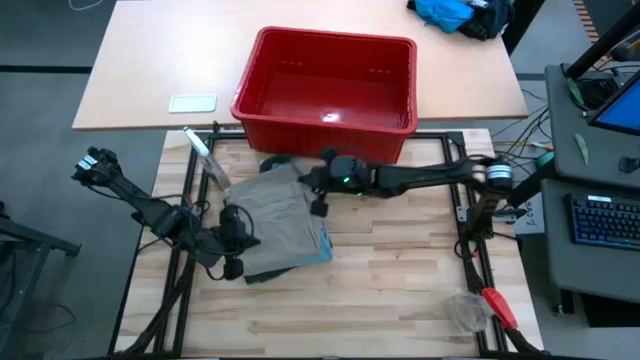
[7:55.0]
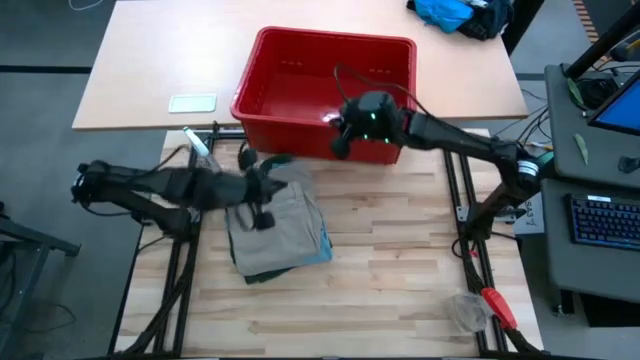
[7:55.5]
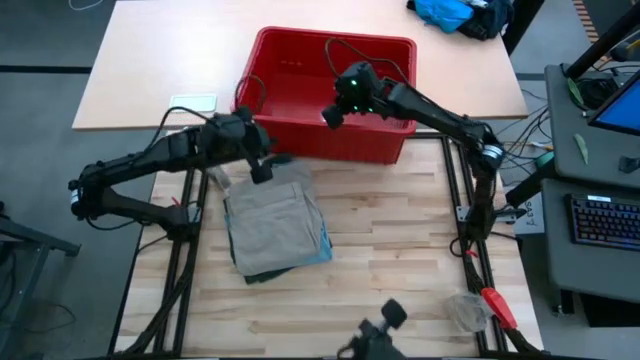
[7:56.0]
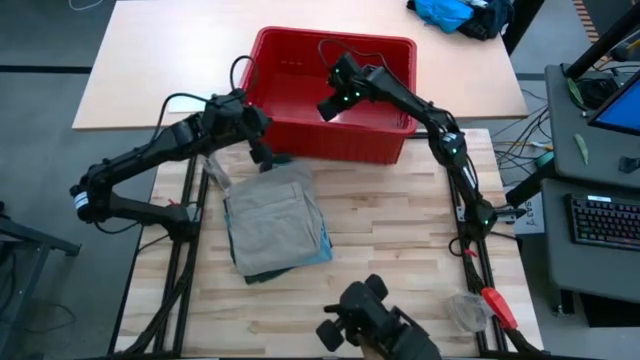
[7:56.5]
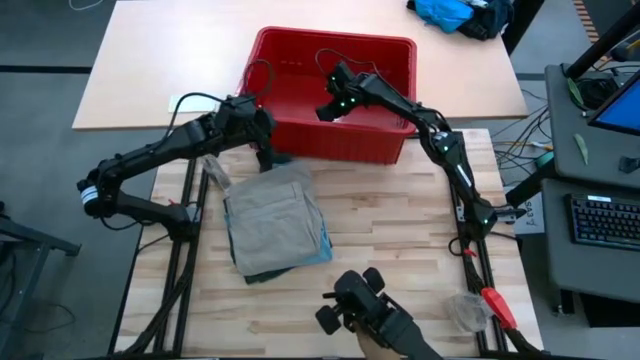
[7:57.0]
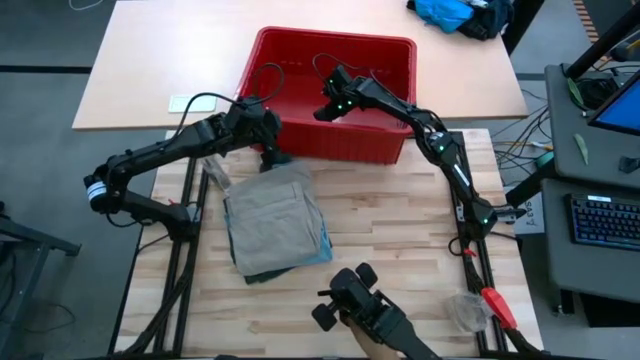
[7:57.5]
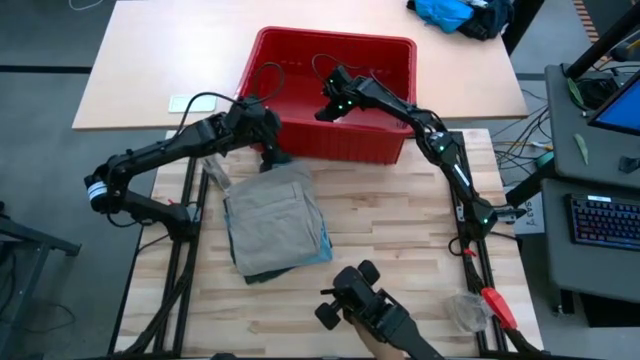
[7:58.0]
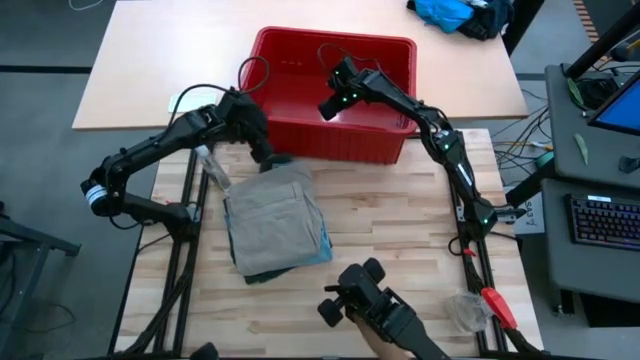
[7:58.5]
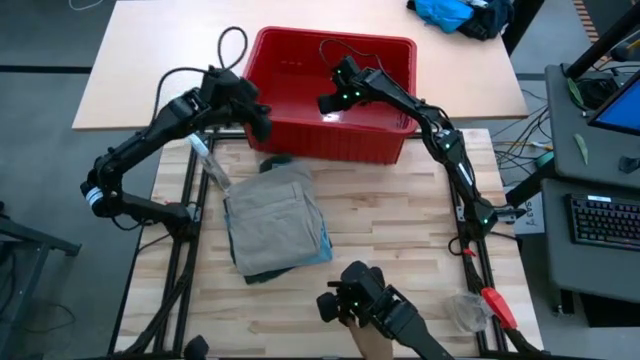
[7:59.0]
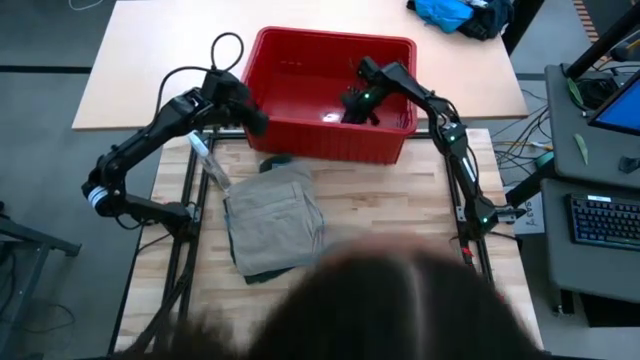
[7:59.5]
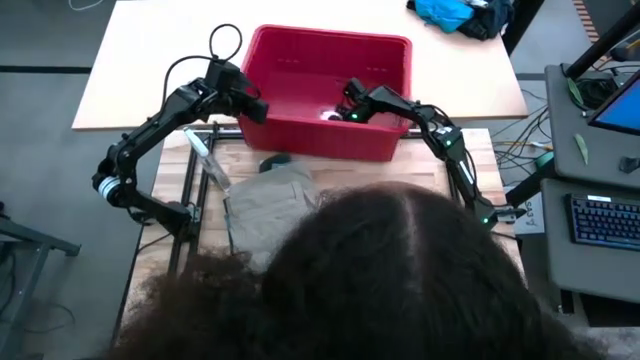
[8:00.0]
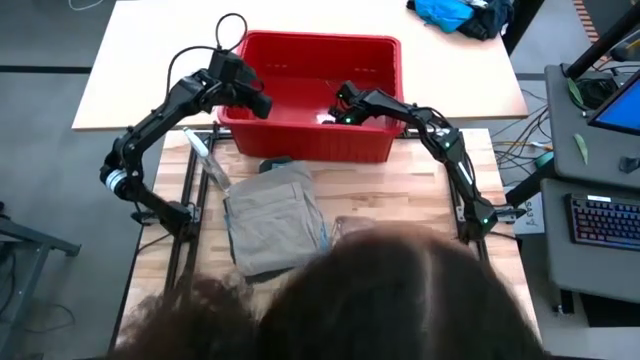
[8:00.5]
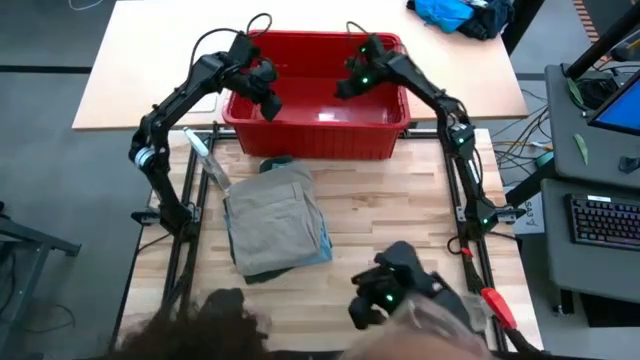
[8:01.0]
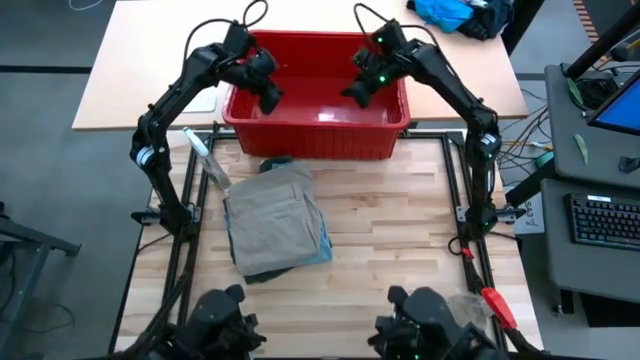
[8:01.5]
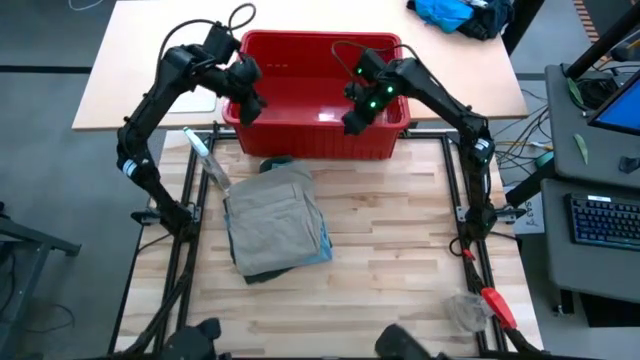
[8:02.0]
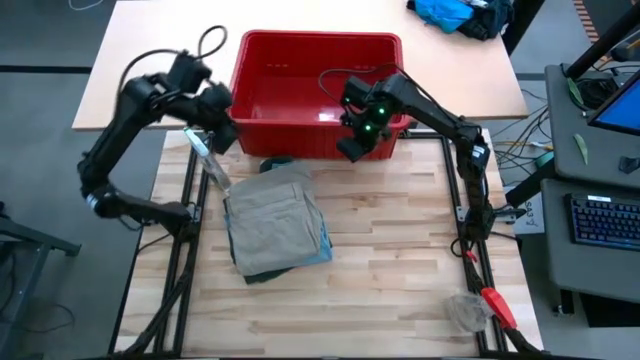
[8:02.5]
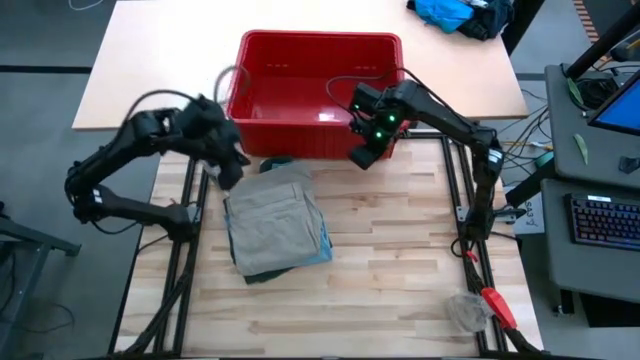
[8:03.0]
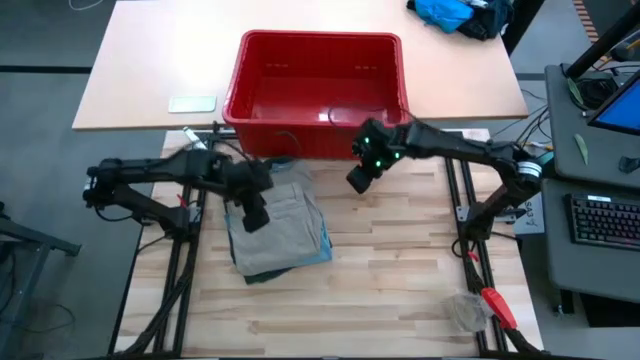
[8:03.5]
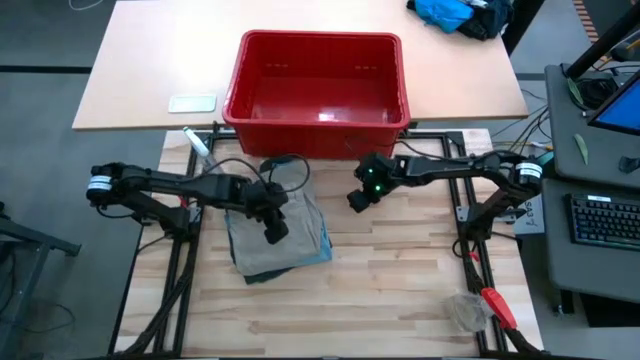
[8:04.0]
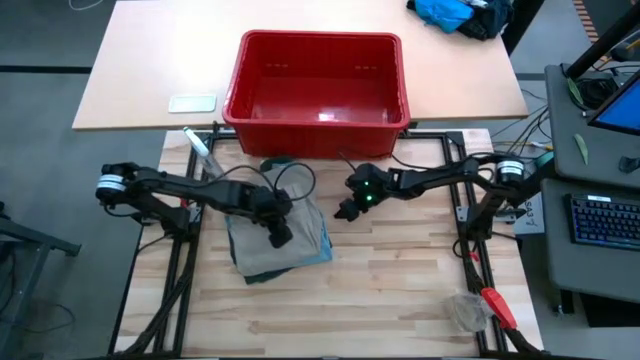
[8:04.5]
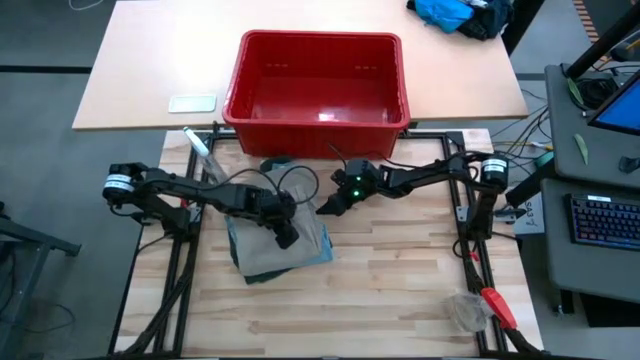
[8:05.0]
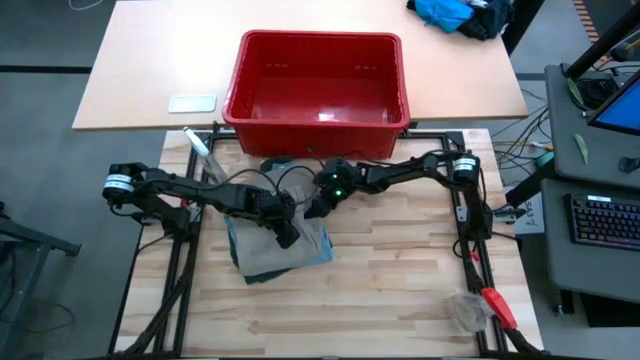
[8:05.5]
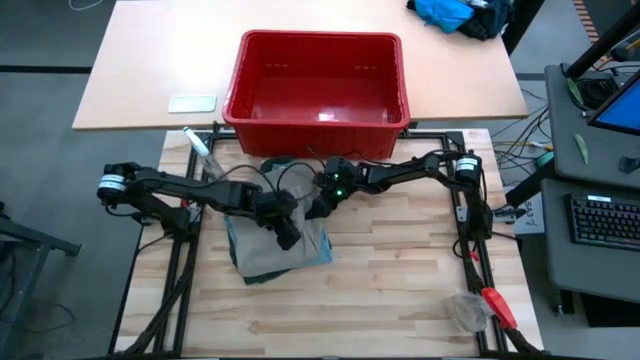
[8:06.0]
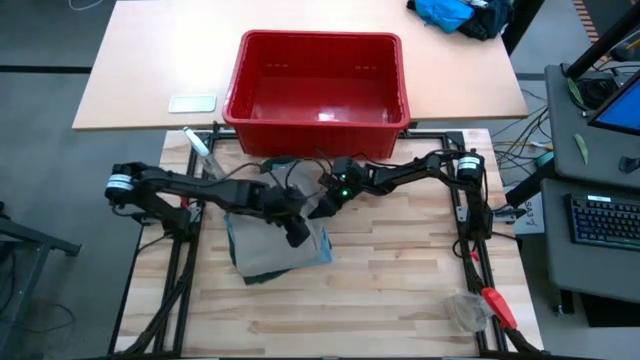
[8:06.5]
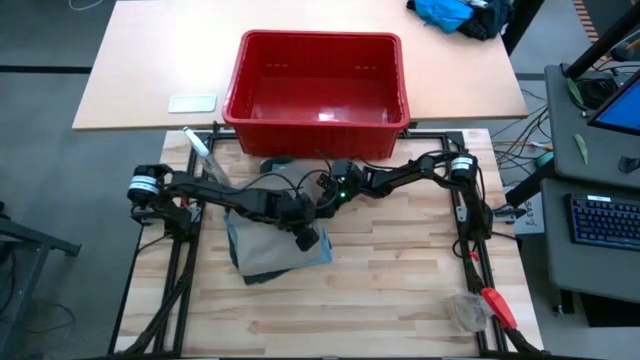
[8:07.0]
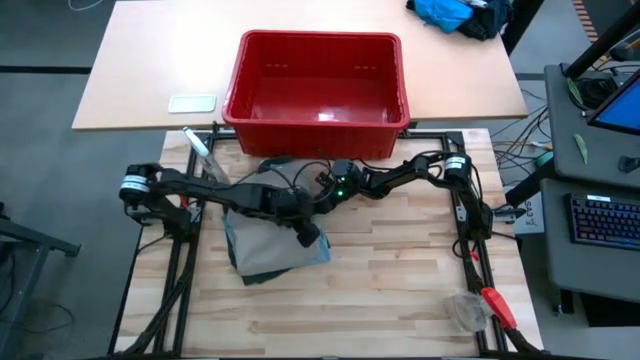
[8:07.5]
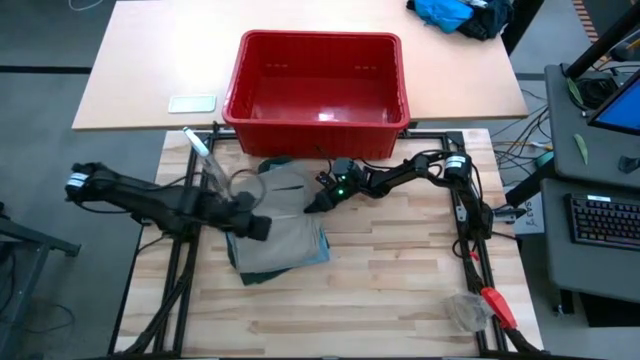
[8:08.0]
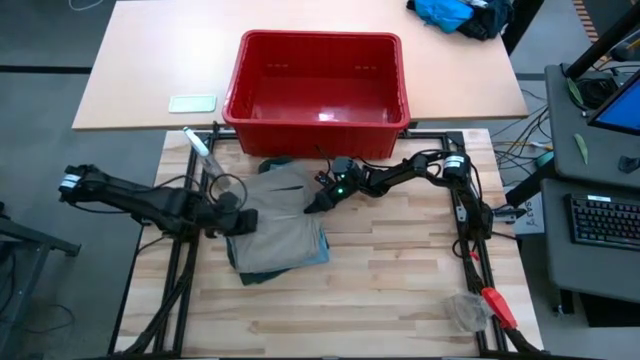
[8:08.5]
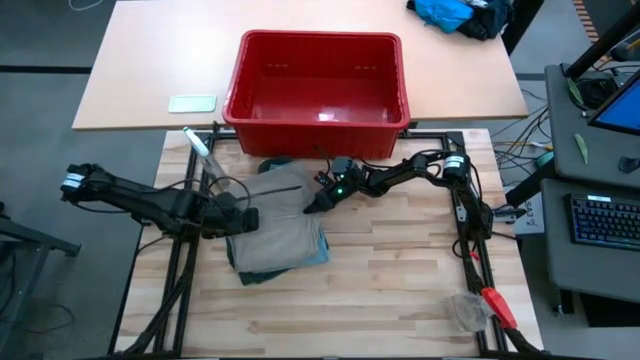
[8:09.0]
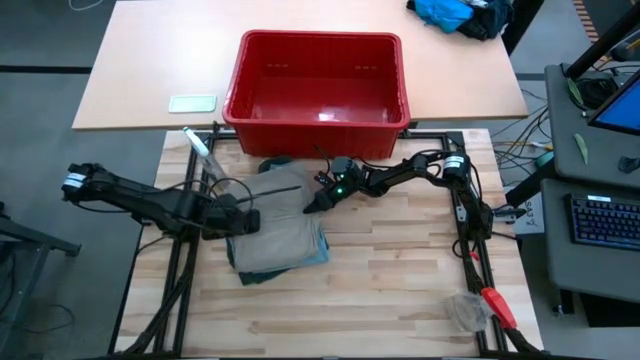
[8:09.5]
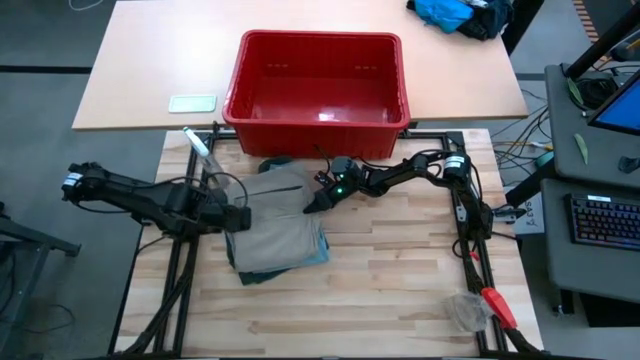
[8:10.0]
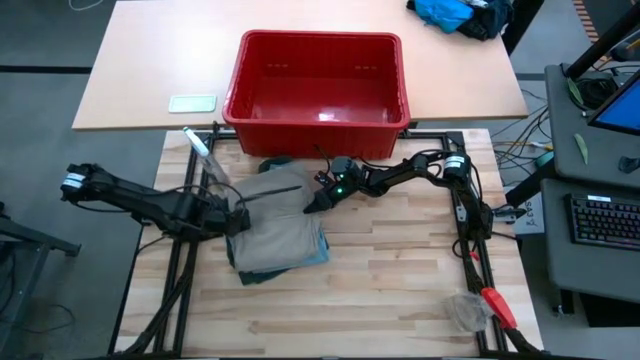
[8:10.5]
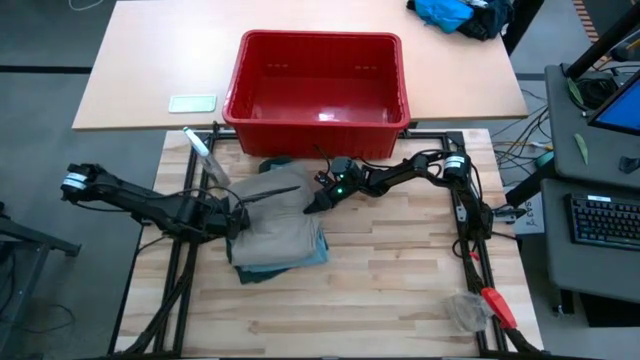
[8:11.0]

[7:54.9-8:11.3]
Task: Fold Laundry from Bin
Put the stacked folded clothes into the red bin

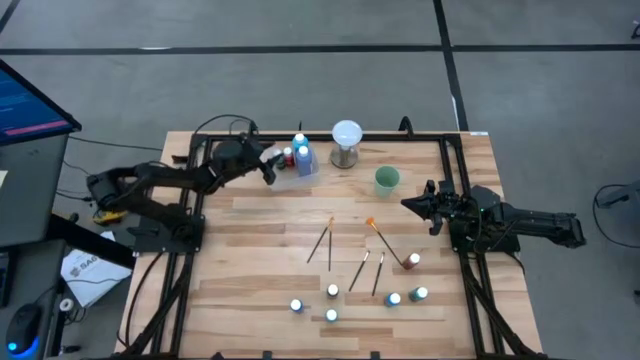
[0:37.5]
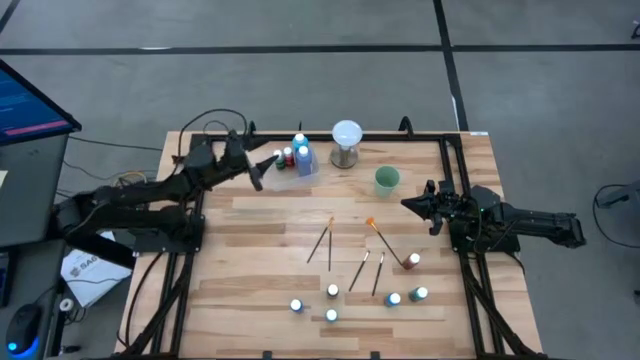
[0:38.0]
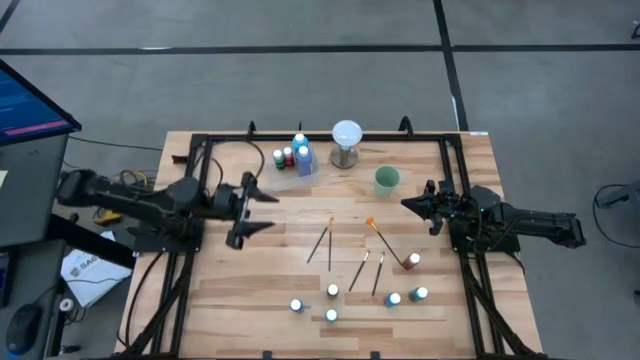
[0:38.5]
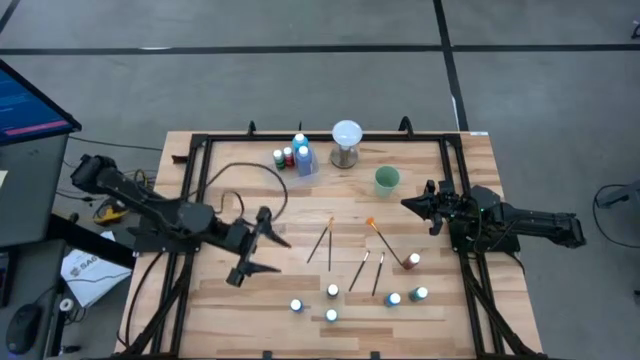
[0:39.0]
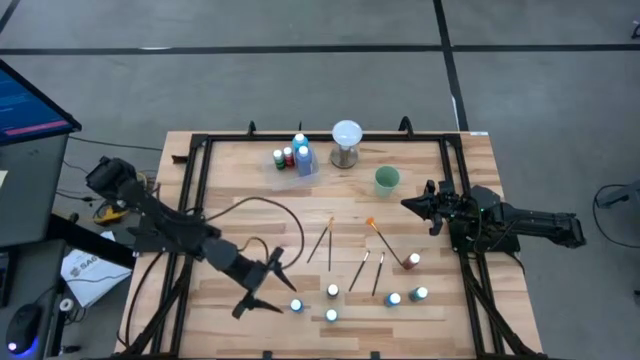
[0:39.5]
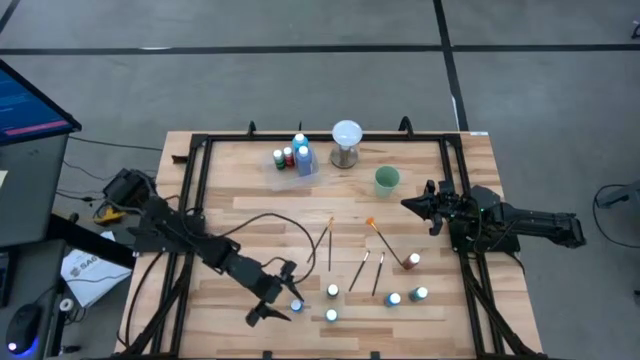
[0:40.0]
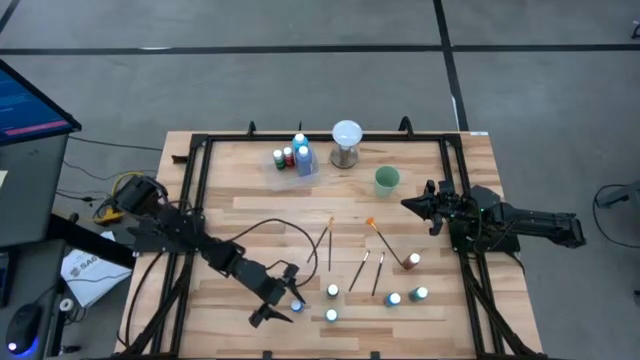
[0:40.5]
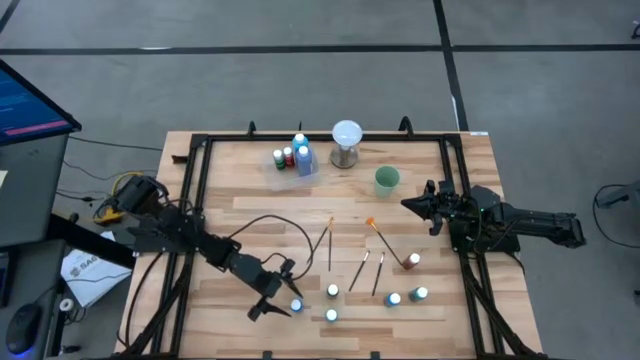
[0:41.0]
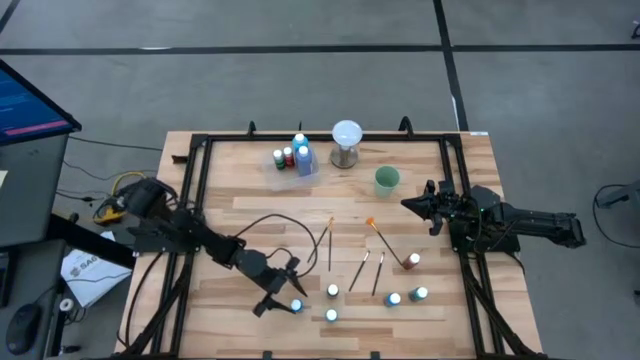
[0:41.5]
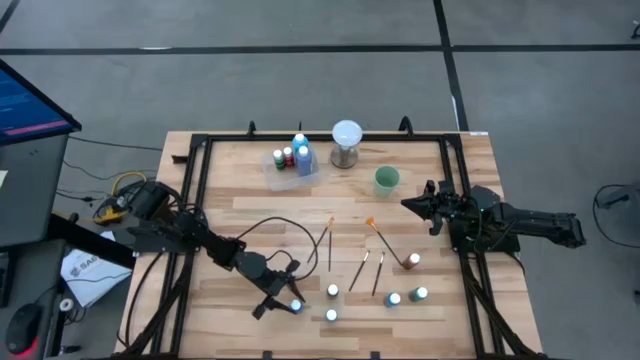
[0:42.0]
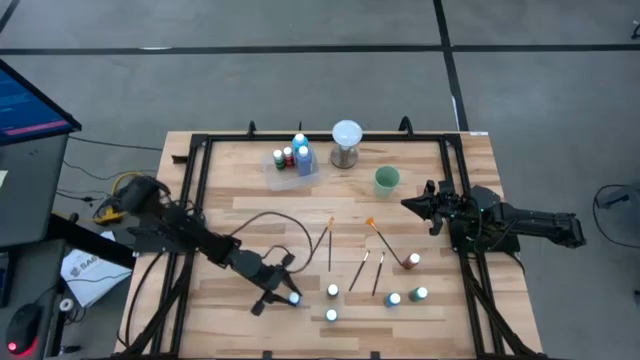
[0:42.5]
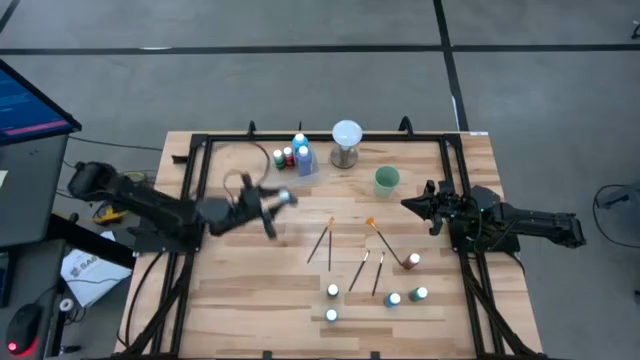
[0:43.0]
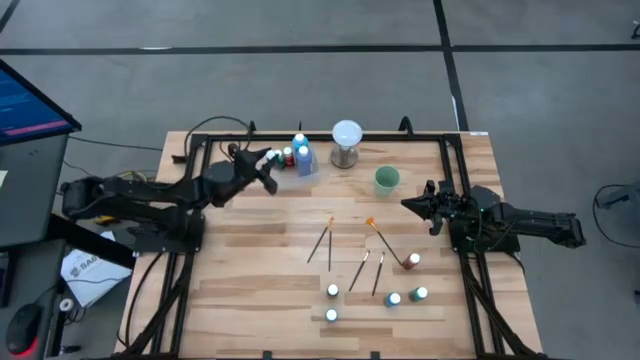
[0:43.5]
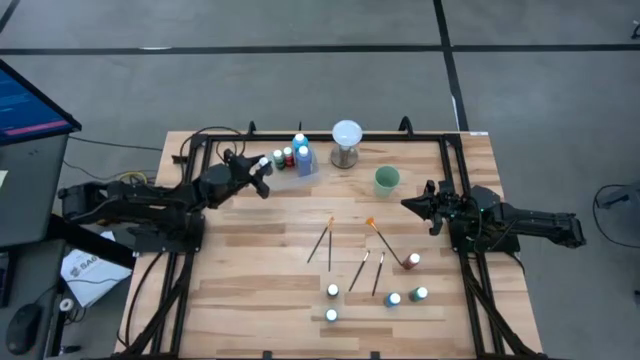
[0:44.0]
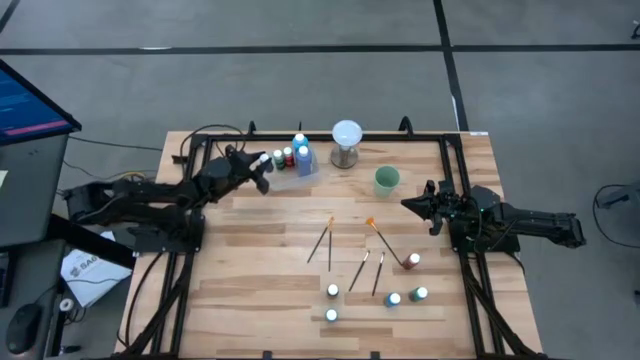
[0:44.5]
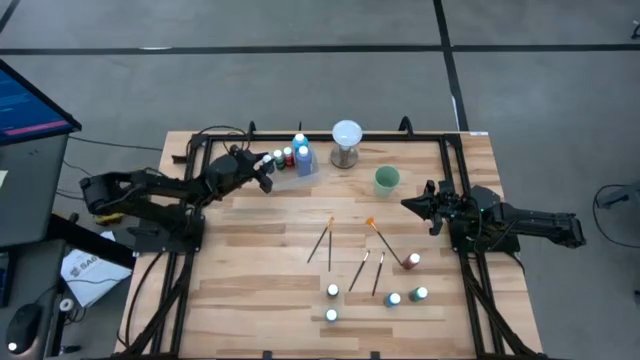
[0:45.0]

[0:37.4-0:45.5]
Task: Pick & Place Paint Supplies
Put the left small blue paint bottle into the transparent bin
